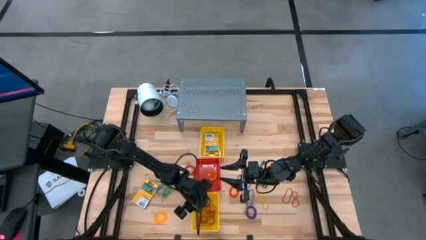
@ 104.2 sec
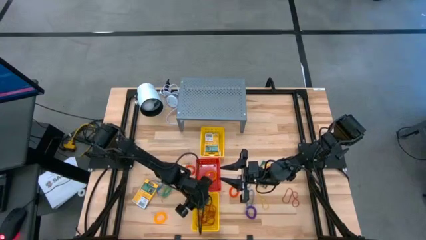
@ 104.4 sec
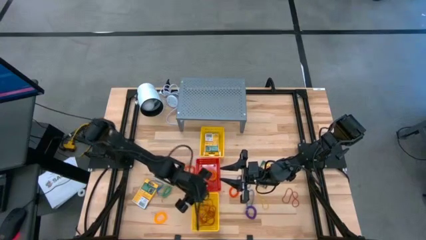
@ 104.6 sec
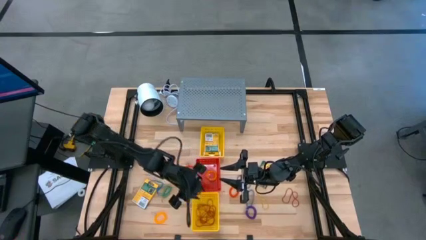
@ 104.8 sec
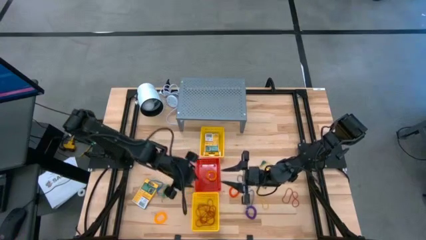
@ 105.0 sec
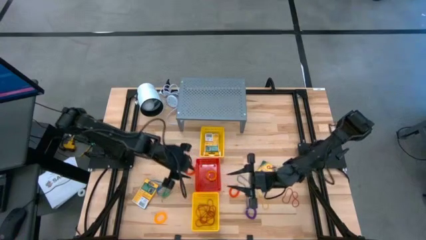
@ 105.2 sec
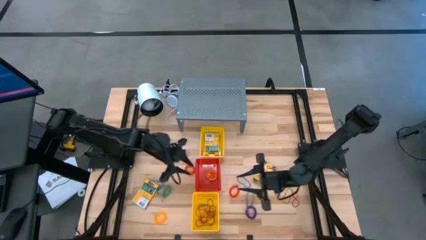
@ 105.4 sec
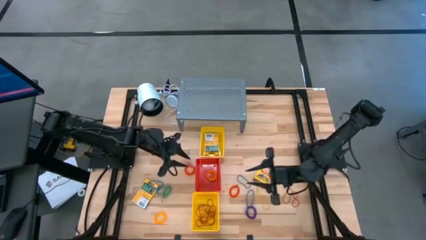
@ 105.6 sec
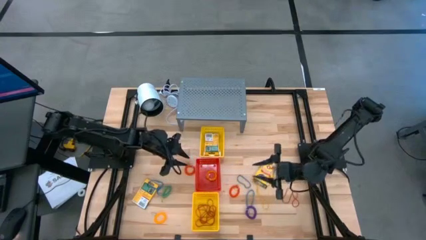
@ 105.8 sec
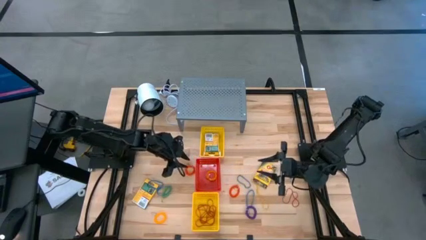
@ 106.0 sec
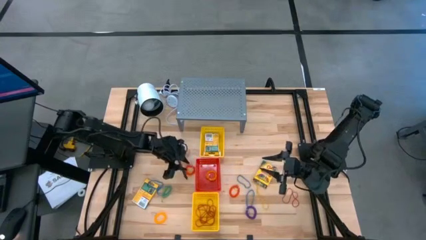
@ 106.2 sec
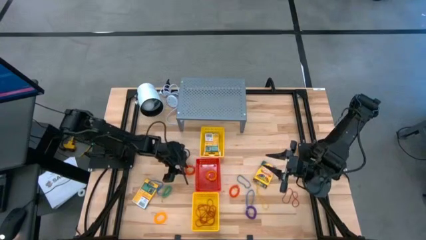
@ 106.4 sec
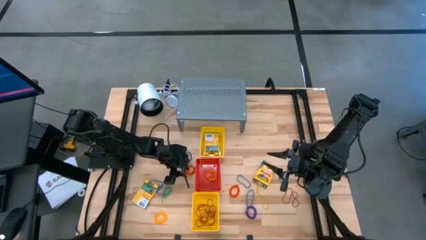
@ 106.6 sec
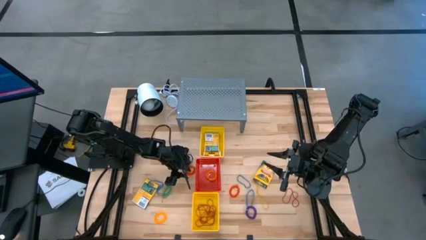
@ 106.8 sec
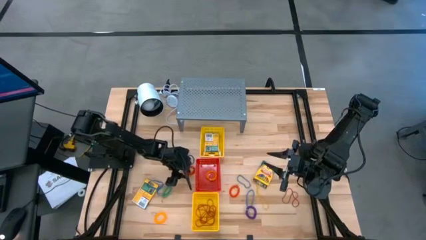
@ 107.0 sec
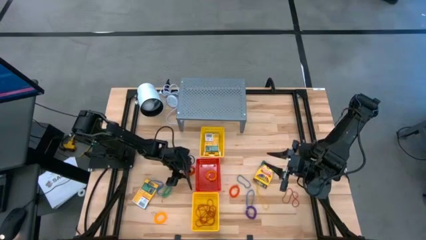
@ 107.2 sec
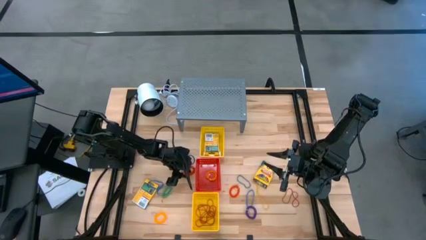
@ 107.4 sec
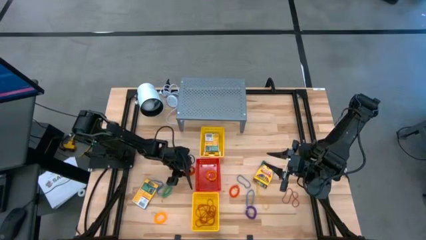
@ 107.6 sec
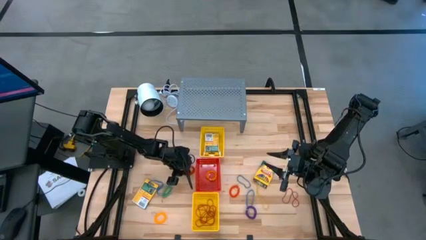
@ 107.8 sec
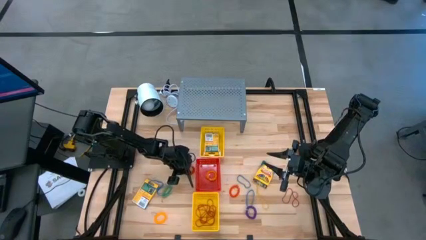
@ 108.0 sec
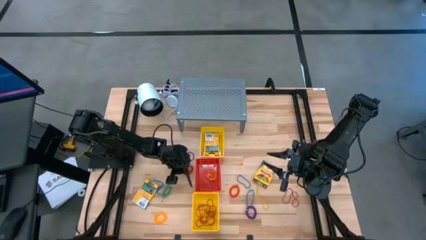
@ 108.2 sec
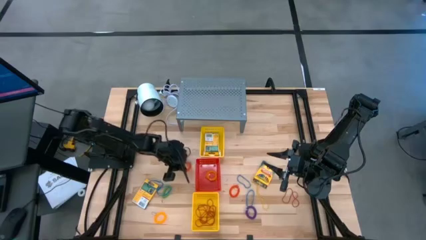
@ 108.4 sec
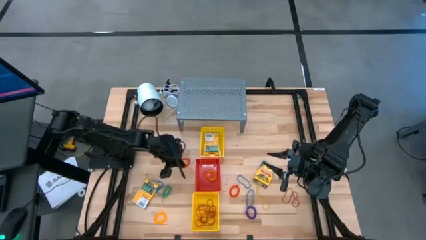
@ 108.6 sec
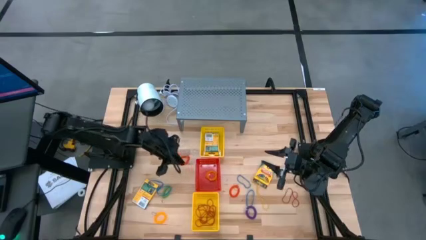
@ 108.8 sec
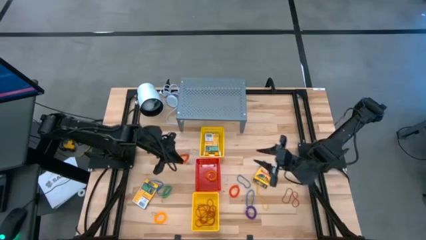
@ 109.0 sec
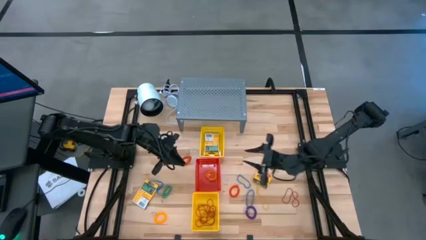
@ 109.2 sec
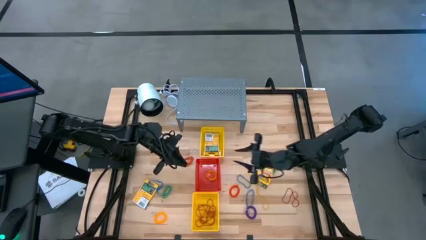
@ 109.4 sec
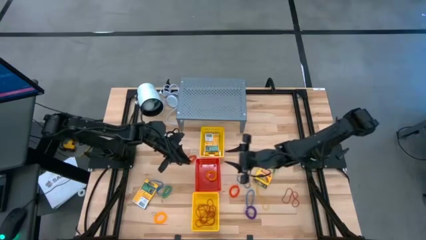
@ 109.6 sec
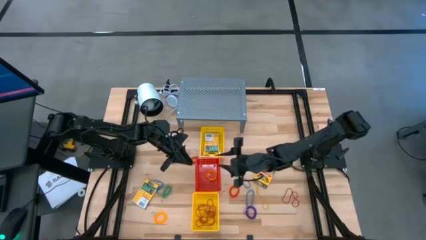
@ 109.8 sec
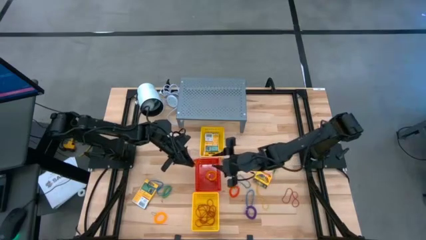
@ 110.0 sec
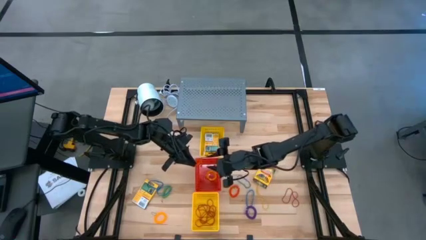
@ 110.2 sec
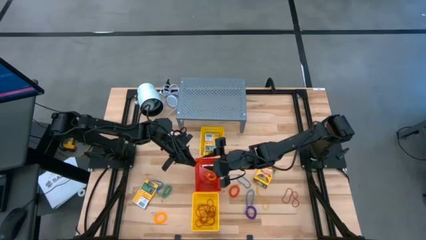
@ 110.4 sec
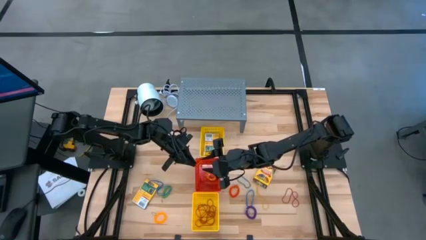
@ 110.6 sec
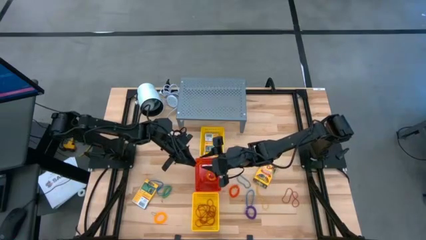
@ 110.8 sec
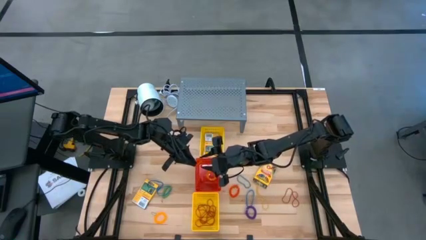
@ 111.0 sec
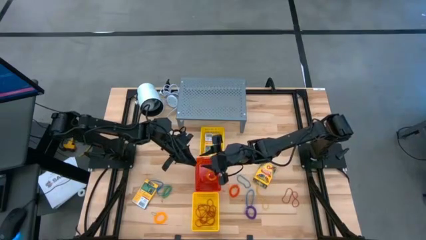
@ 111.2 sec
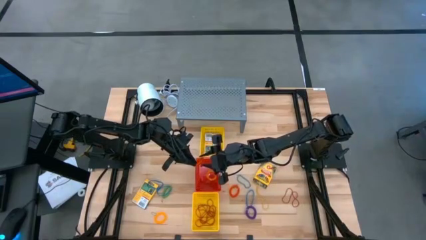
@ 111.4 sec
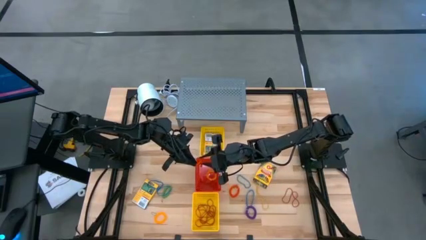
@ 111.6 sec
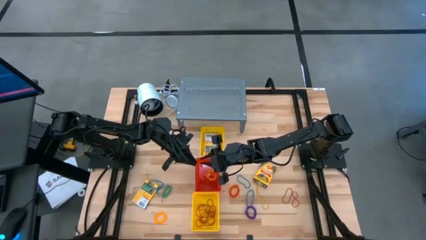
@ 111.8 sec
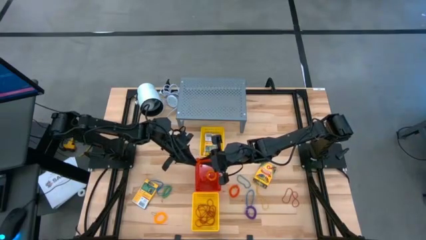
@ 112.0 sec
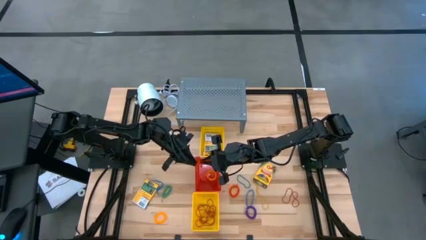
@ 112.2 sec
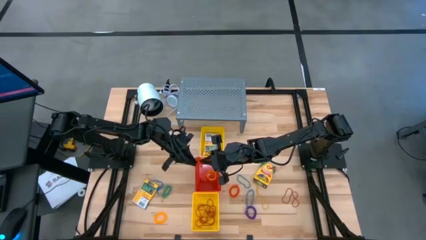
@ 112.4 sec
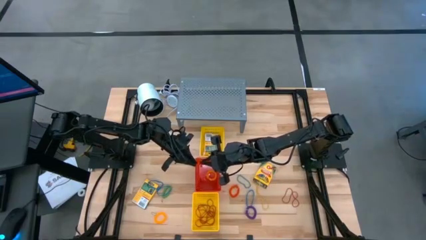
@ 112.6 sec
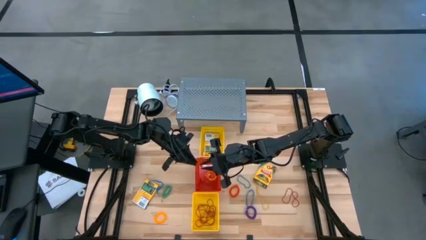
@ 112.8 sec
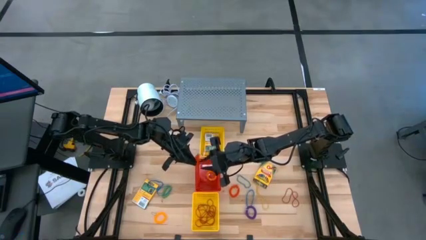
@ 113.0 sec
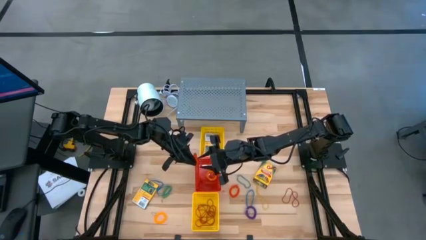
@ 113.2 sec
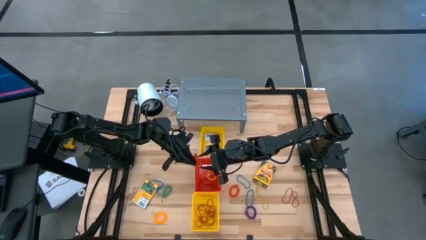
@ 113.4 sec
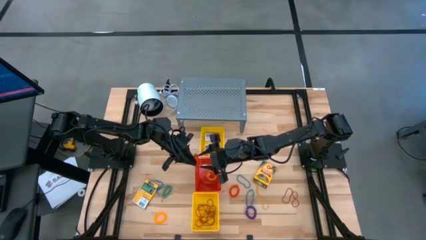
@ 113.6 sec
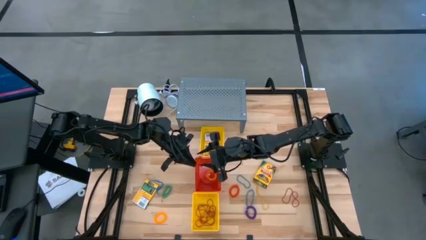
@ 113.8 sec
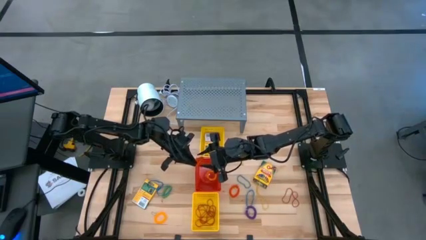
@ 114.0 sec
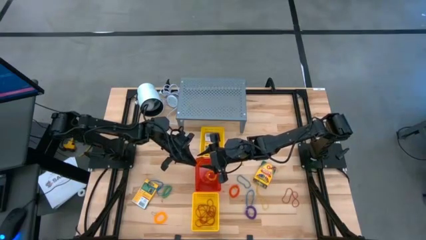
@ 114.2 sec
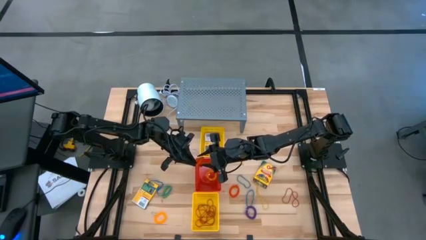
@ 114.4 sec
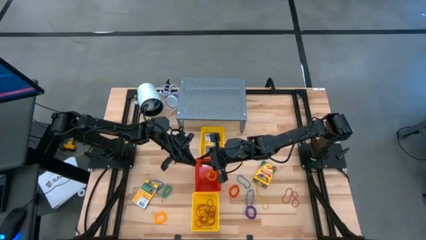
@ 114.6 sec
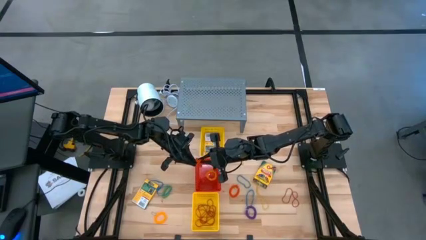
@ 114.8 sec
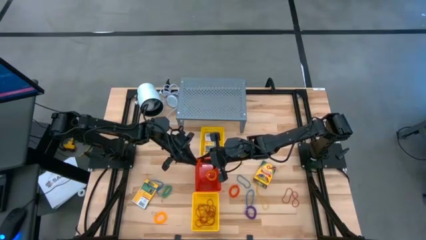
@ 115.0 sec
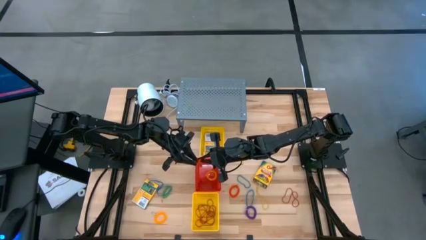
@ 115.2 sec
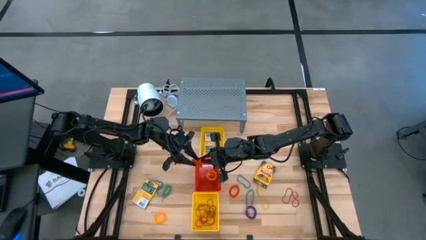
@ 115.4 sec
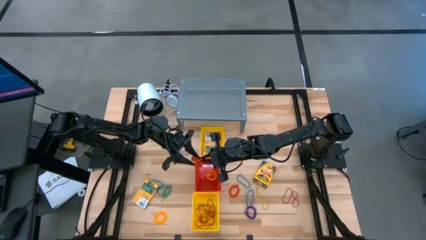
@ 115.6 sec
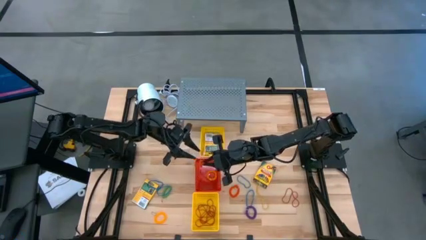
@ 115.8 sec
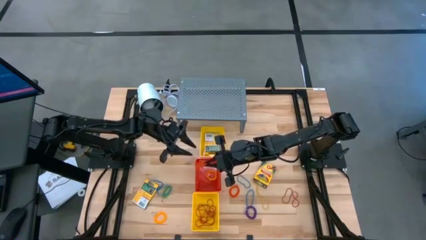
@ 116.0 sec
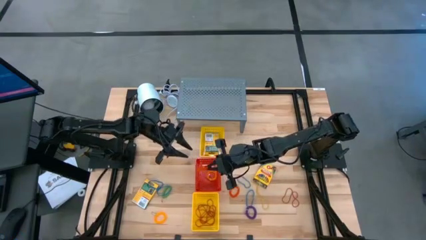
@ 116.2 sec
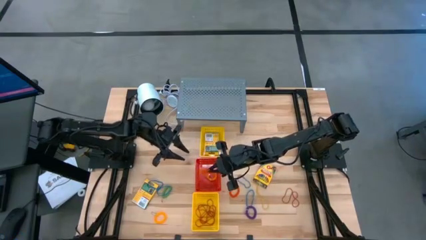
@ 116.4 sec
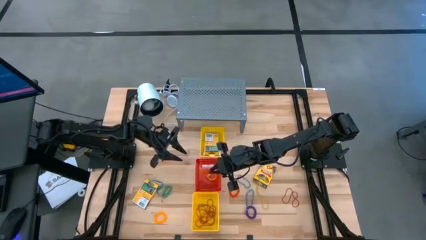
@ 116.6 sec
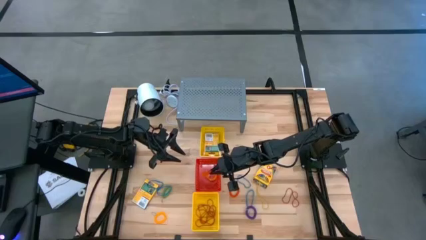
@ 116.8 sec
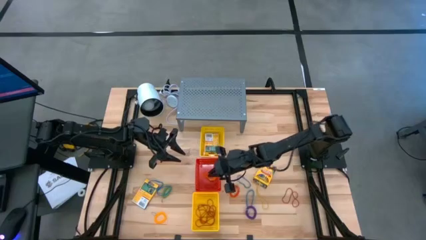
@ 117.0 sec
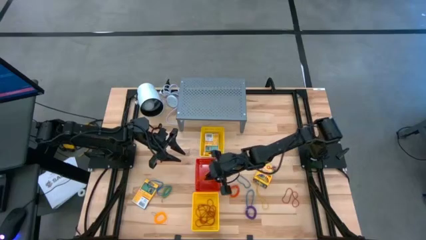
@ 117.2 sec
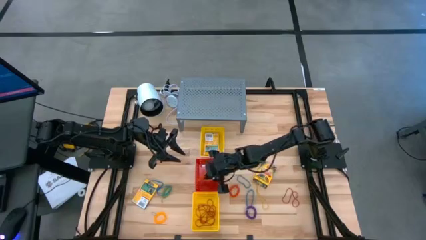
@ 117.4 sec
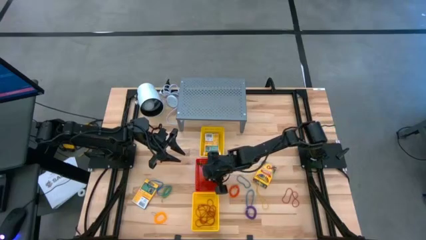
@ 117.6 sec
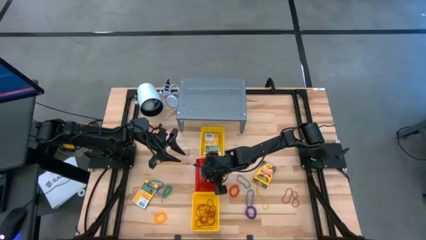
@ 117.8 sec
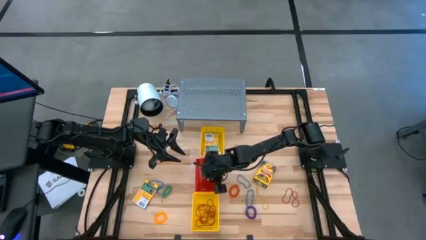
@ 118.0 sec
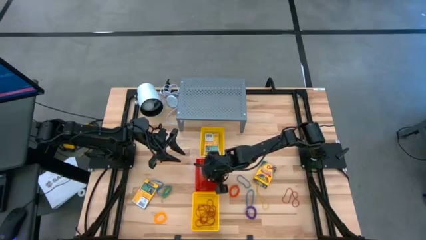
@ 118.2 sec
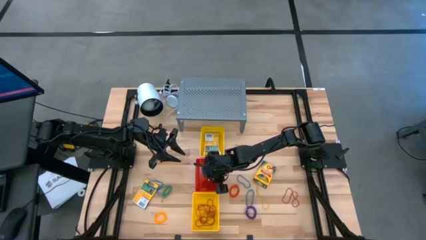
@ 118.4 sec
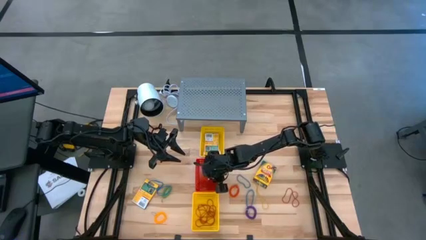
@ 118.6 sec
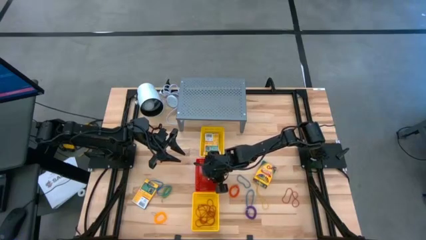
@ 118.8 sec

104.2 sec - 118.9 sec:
Task: Pick & Place Office Desk Supplies
Put the orange spring rubber band into the red bin

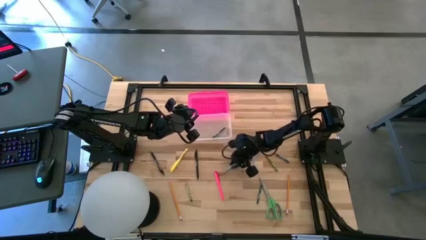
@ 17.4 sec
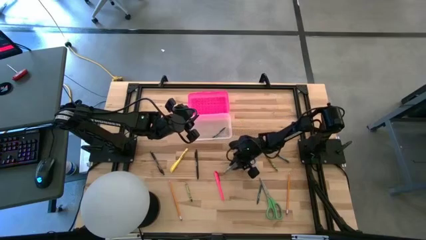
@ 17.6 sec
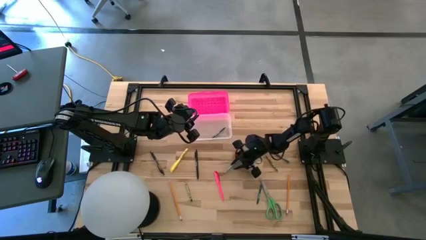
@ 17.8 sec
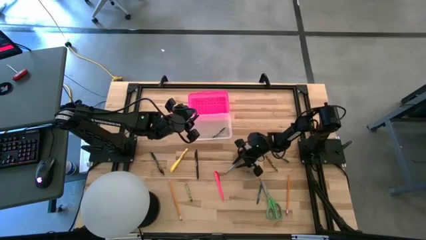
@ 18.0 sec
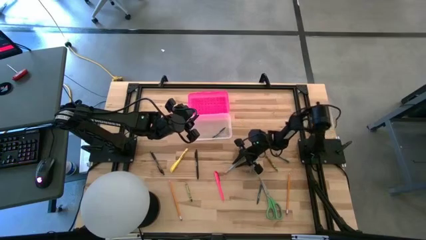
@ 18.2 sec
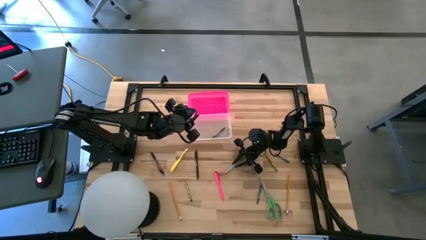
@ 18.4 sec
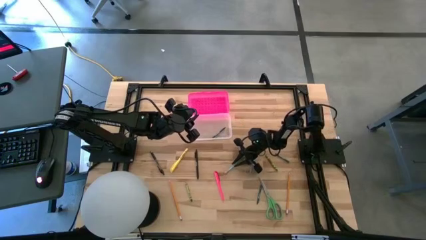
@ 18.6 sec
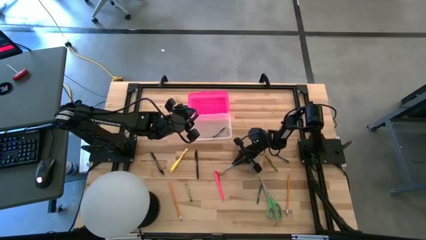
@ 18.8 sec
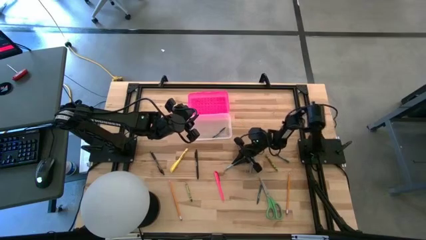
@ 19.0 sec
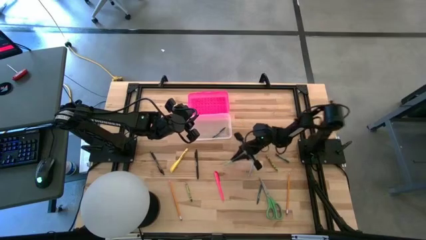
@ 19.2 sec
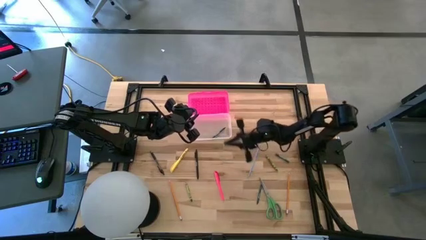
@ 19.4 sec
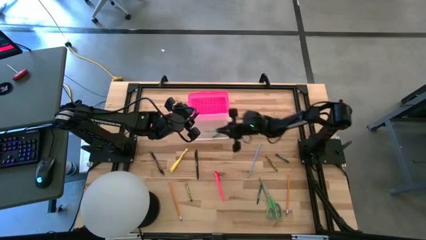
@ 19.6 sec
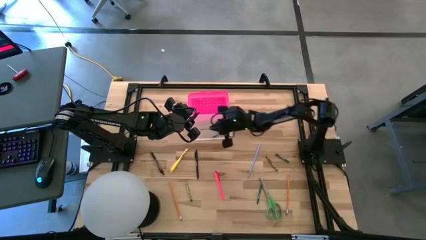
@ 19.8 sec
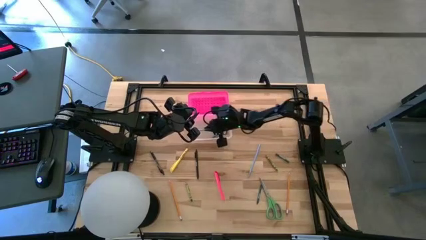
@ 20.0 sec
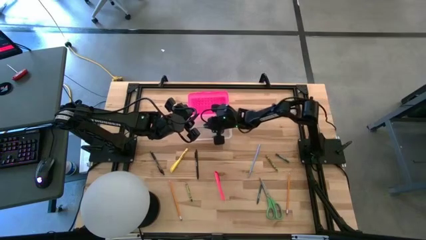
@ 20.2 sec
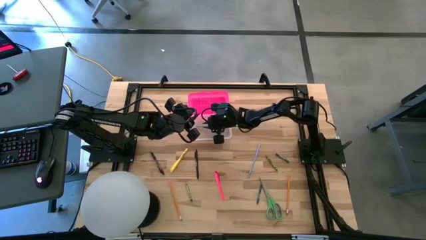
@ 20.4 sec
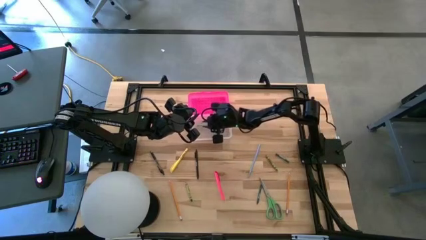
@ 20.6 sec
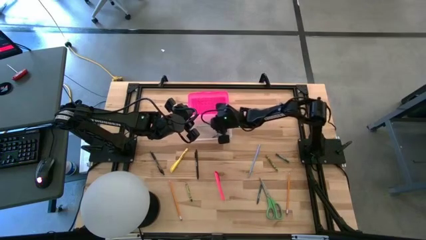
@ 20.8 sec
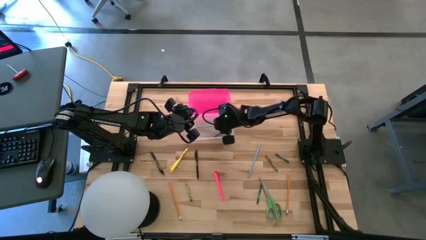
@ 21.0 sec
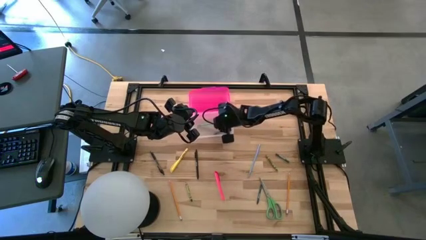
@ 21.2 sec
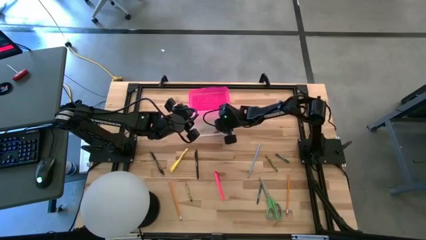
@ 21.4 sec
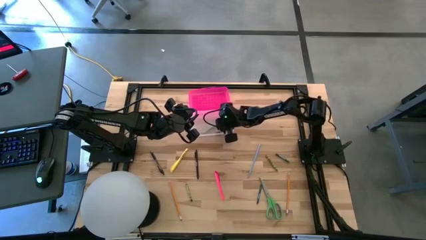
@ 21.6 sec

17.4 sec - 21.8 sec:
Task: Pick & place school supplies into a supply box
Put the blue pencil into the pink supply box
